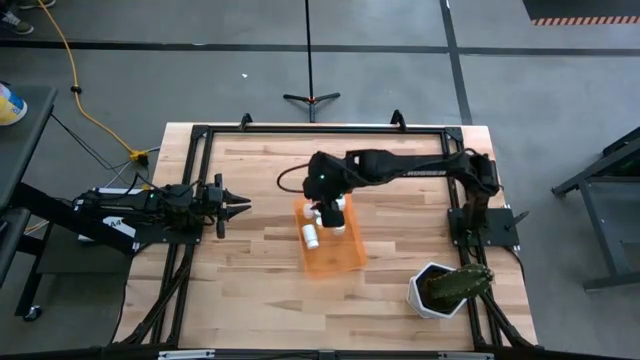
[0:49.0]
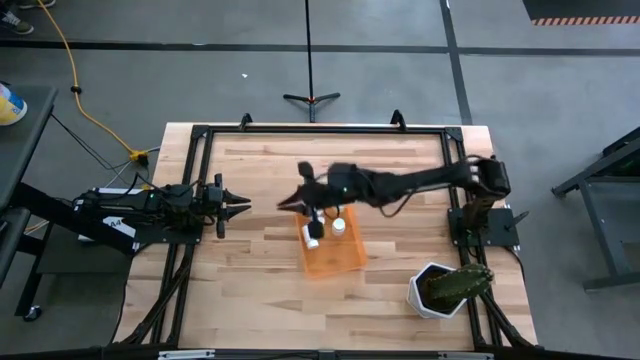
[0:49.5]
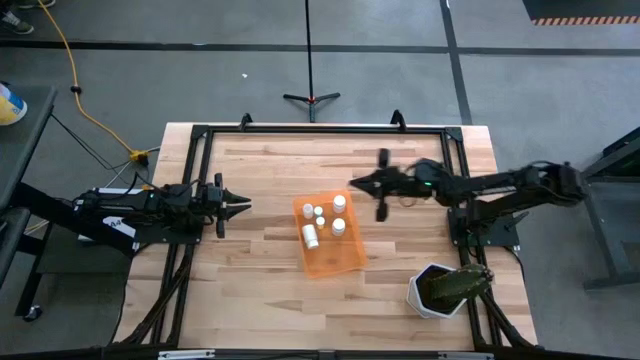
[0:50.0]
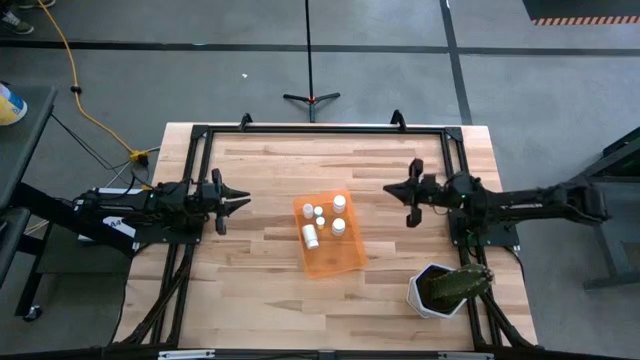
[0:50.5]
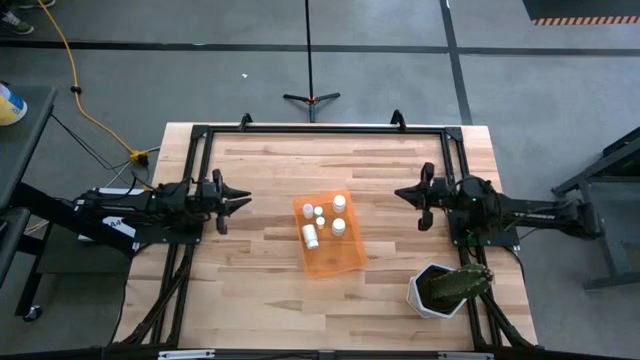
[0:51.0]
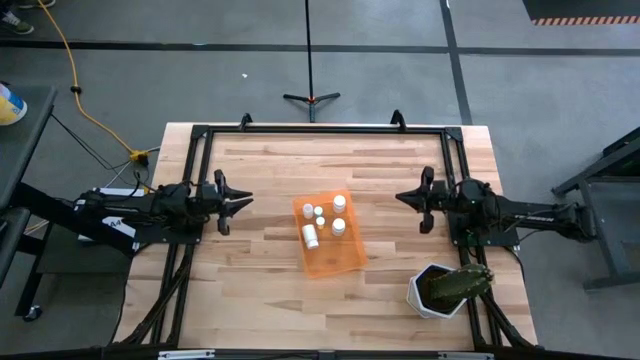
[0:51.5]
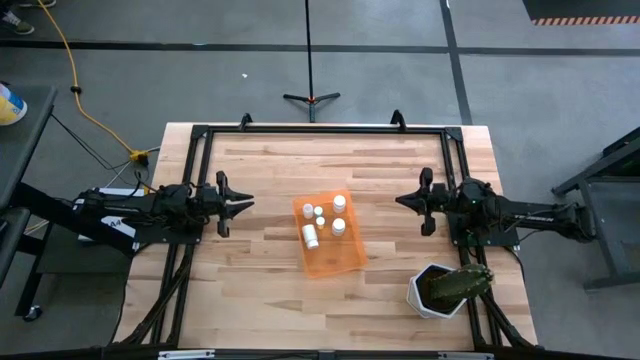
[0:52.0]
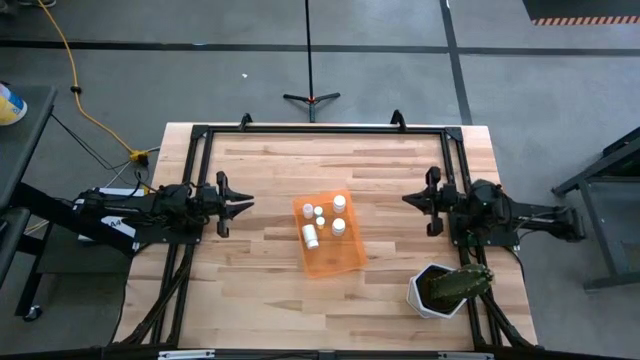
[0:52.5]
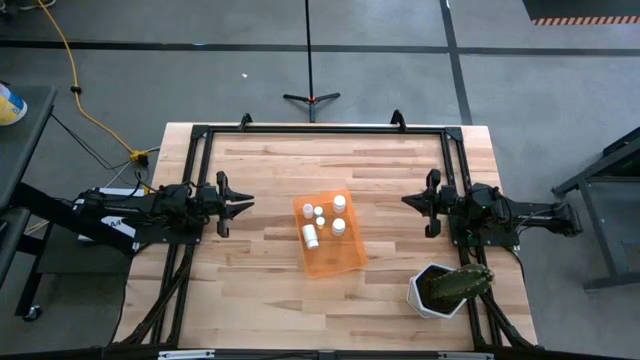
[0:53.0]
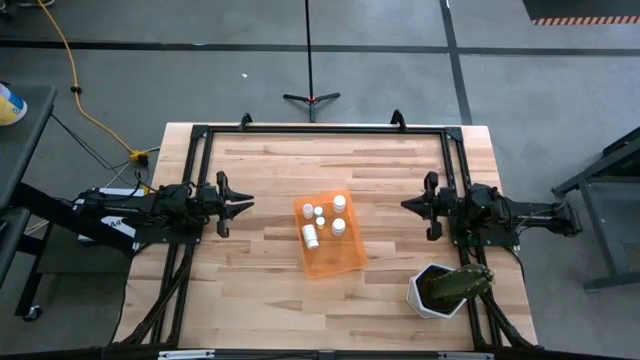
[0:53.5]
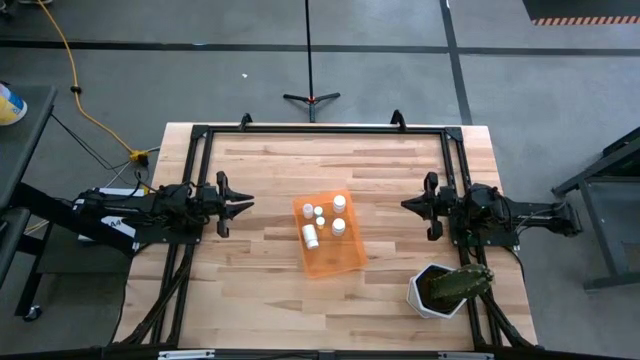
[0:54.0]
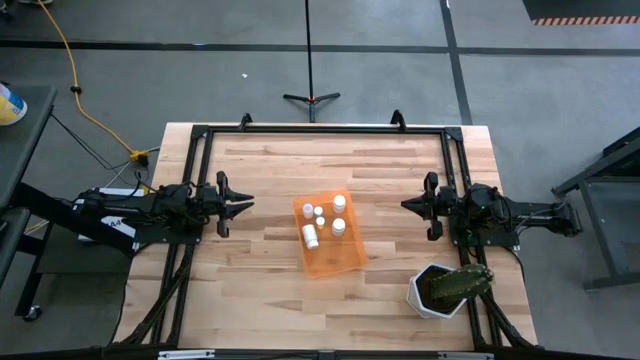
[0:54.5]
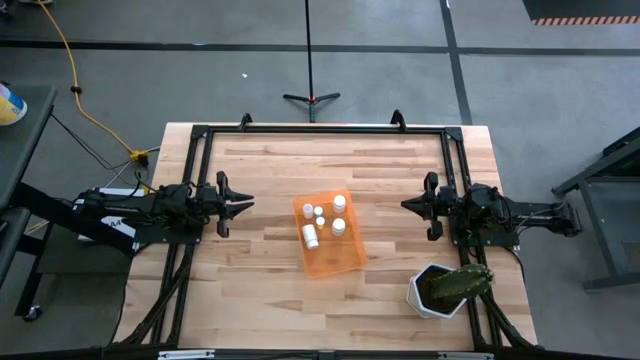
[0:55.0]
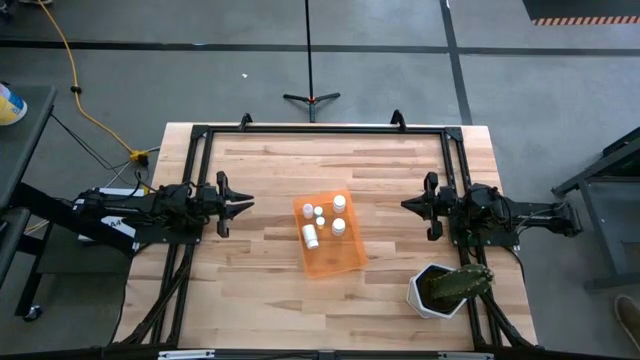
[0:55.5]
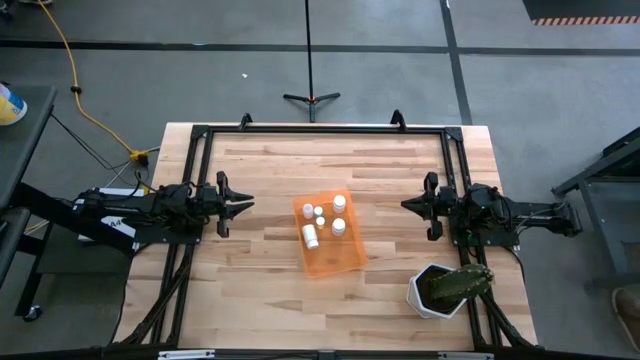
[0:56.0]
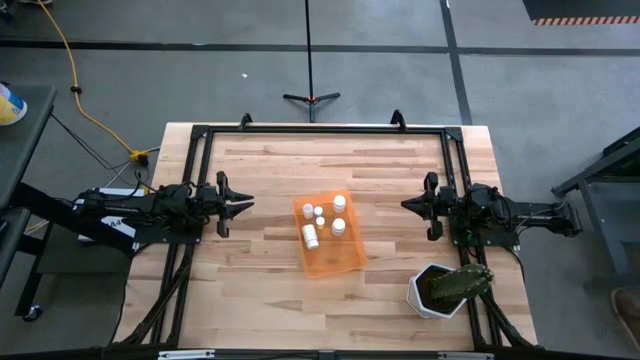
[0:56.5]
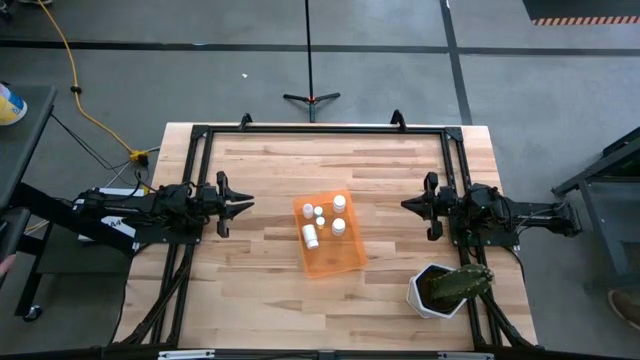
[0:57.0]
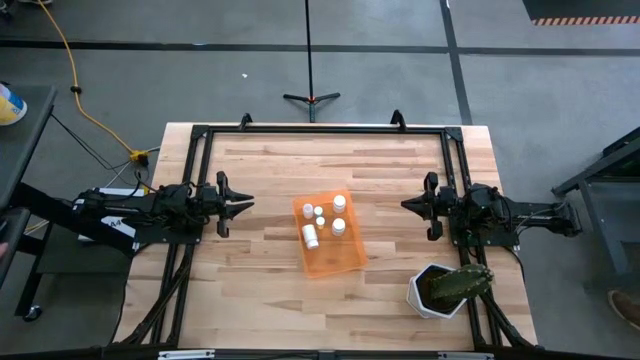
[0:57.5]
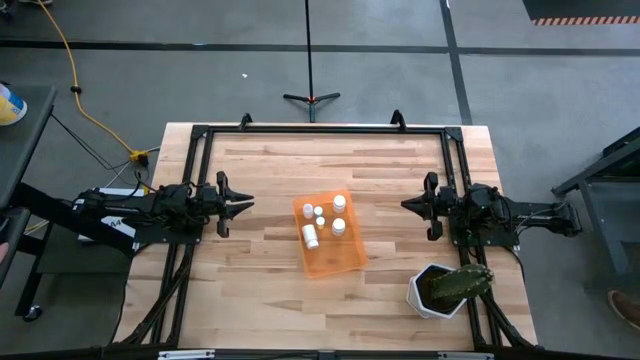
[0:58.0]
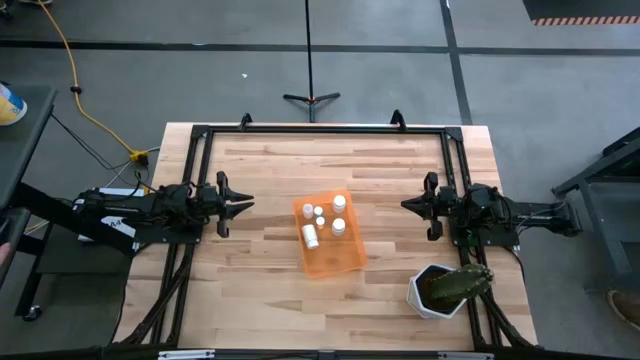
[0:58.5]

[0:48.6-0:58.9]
Task: Pick and place pill bottles into a basket
Return to Home Position

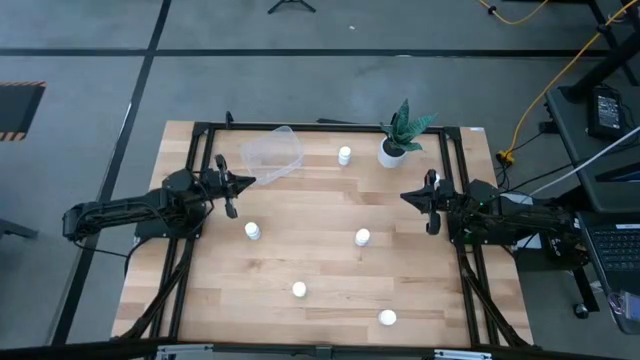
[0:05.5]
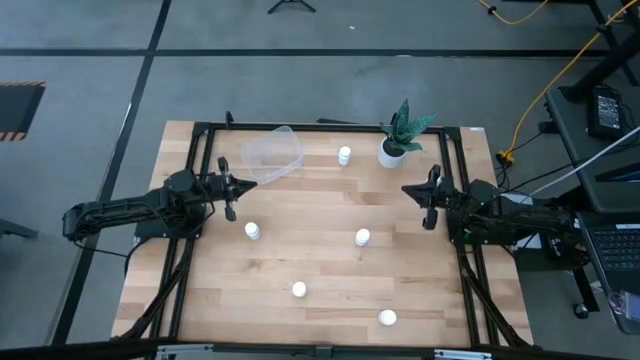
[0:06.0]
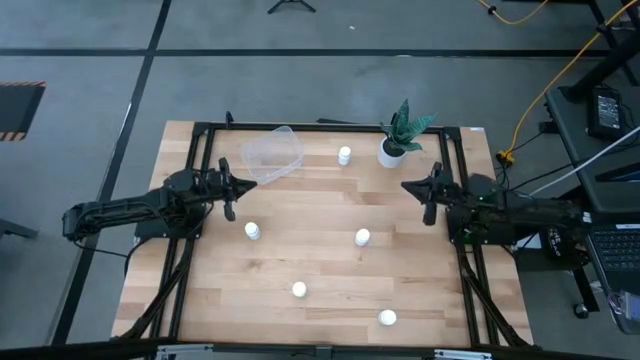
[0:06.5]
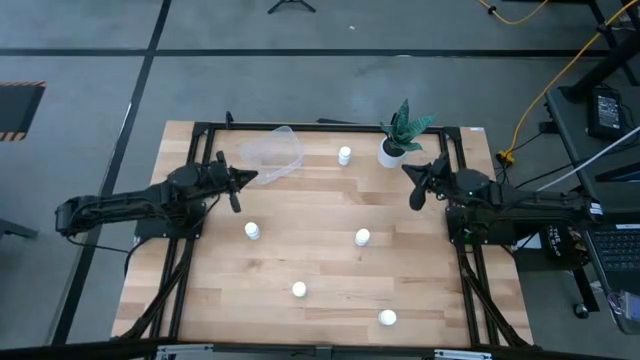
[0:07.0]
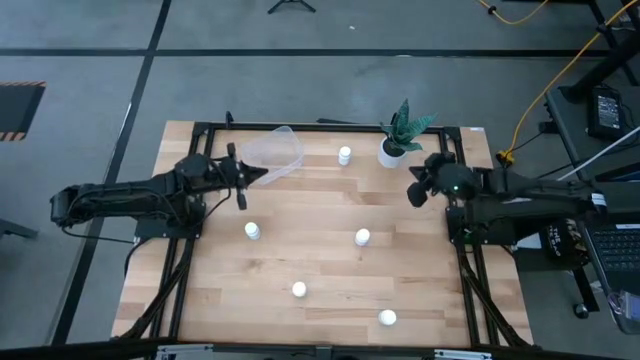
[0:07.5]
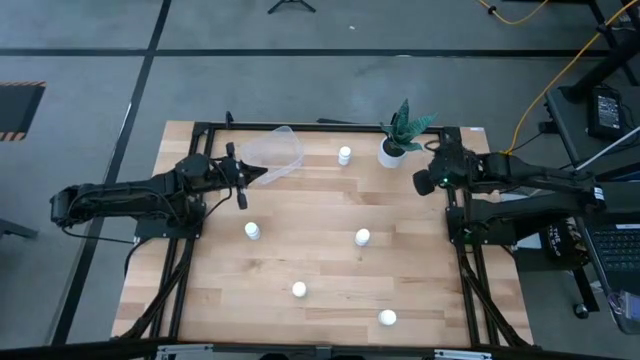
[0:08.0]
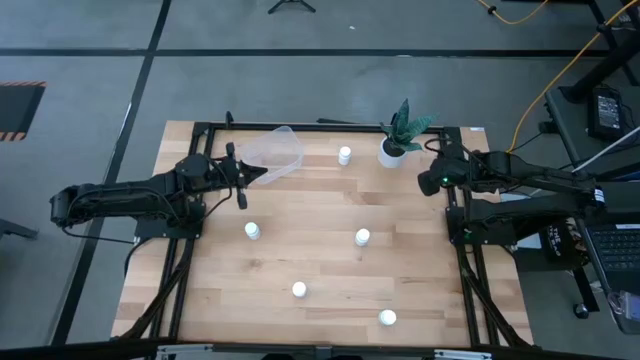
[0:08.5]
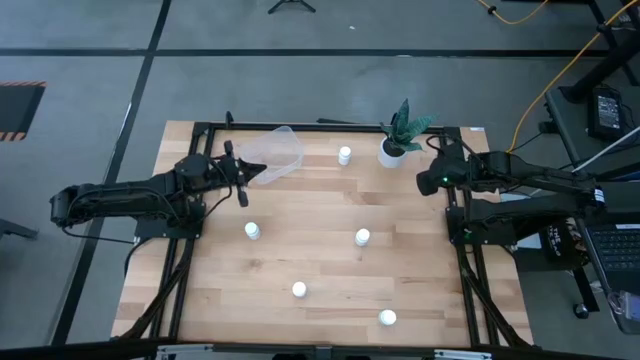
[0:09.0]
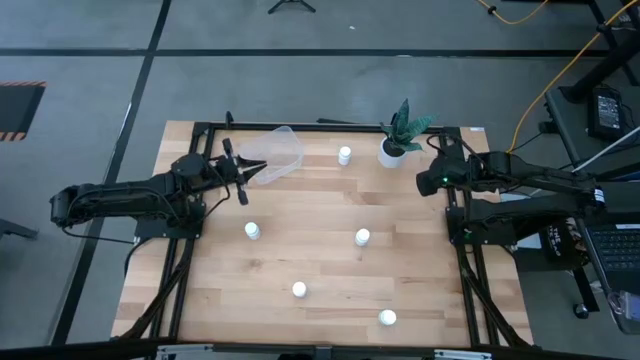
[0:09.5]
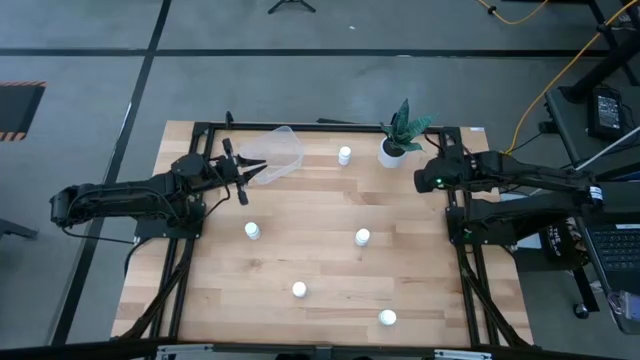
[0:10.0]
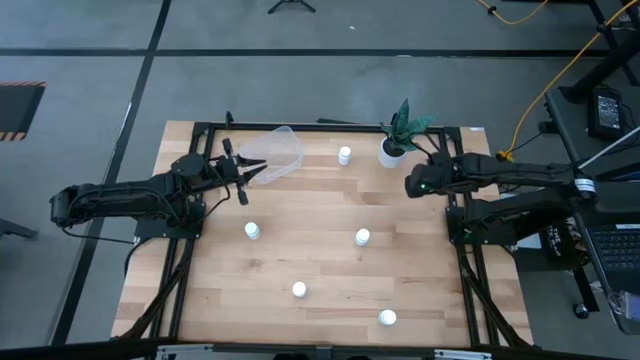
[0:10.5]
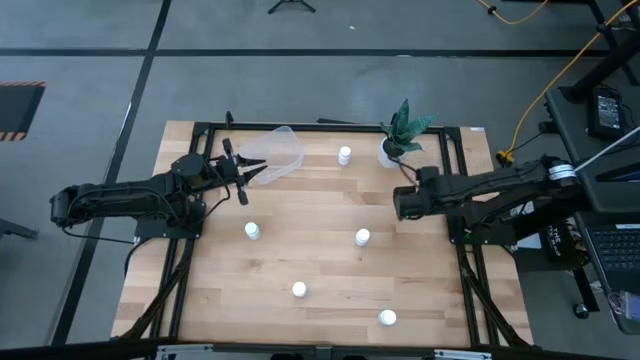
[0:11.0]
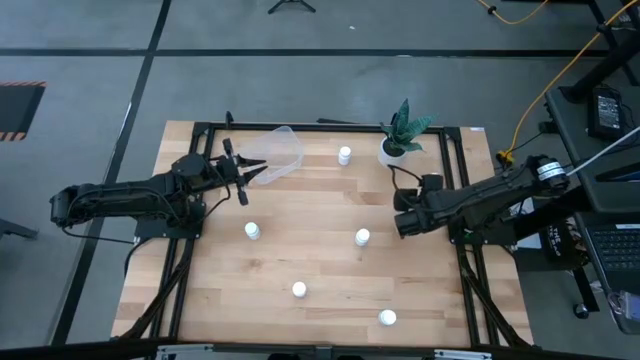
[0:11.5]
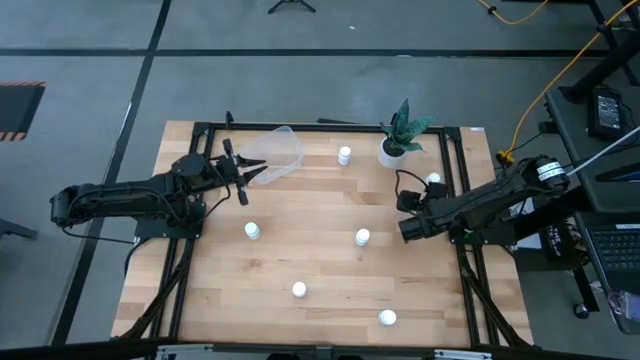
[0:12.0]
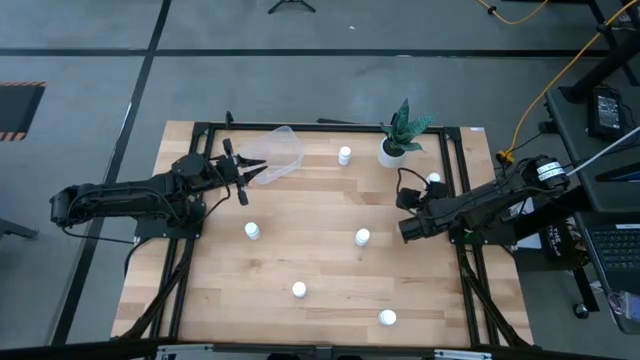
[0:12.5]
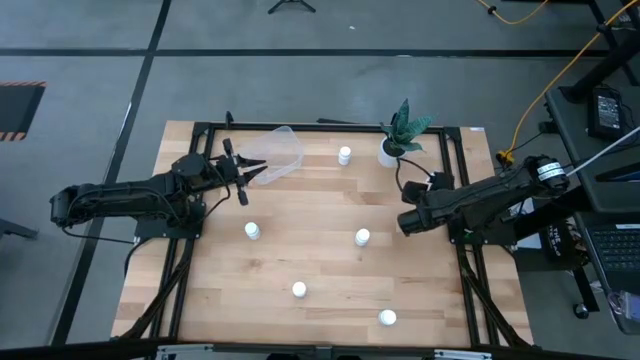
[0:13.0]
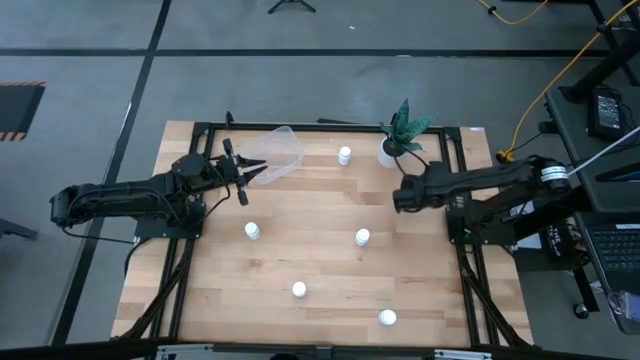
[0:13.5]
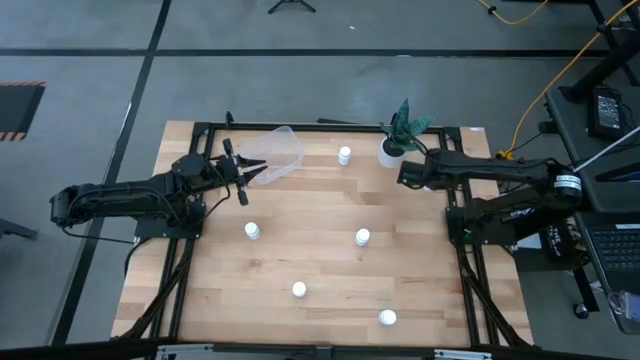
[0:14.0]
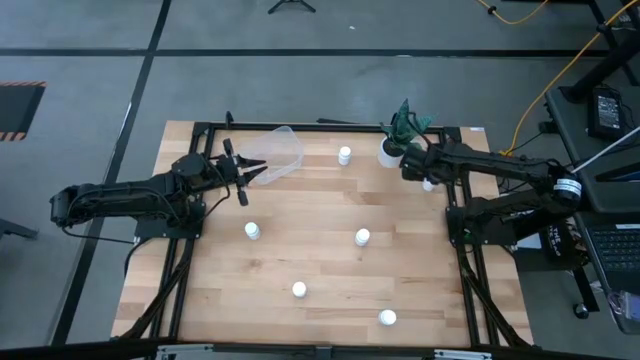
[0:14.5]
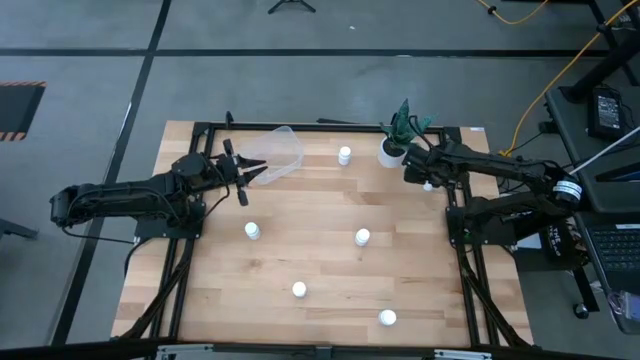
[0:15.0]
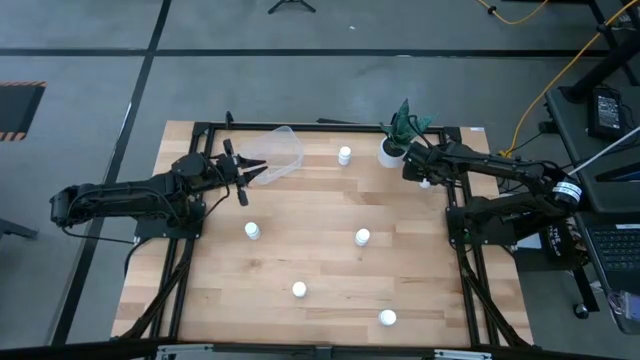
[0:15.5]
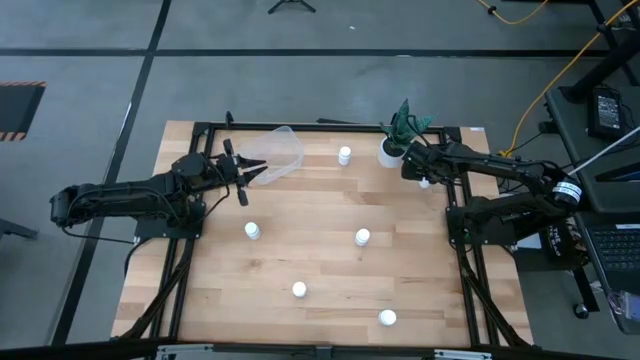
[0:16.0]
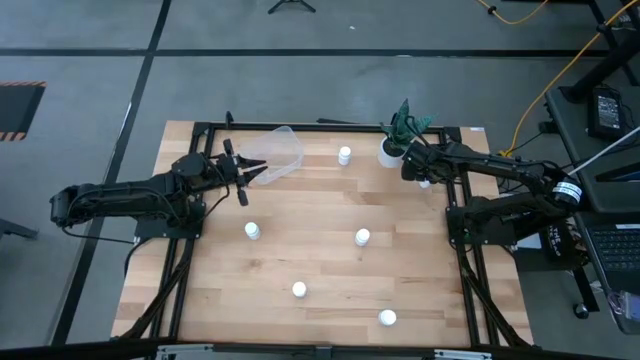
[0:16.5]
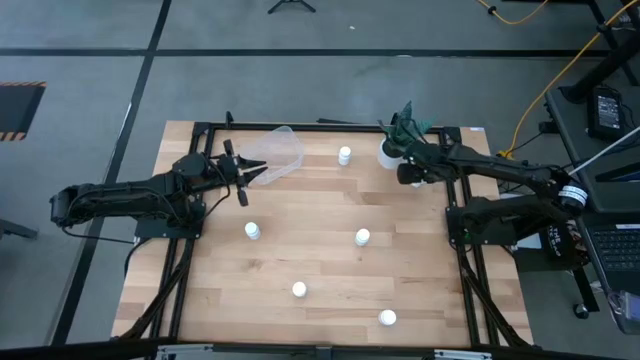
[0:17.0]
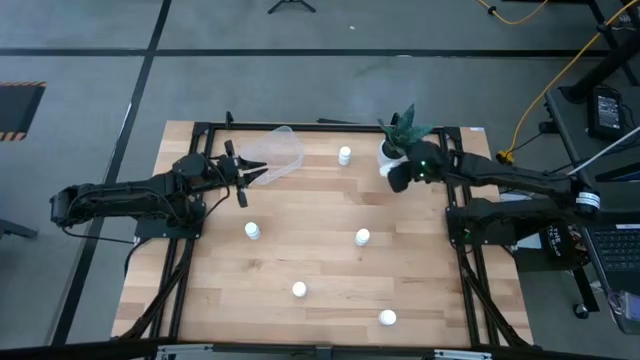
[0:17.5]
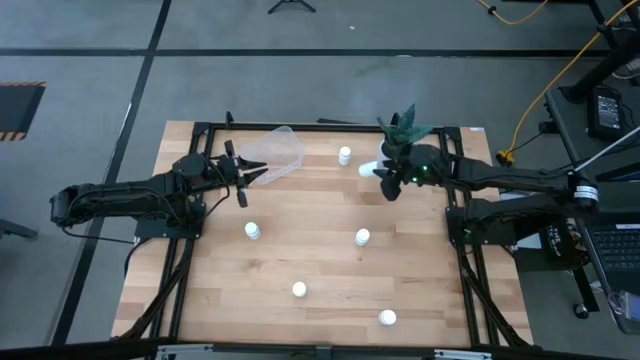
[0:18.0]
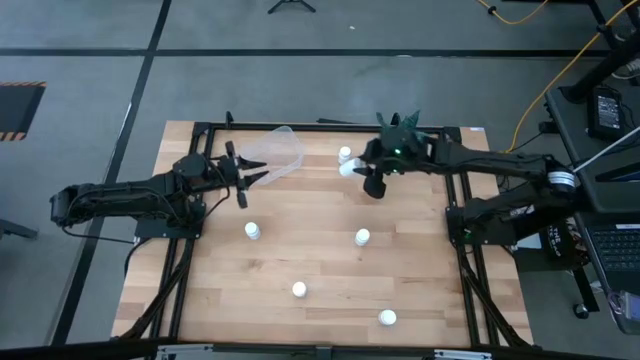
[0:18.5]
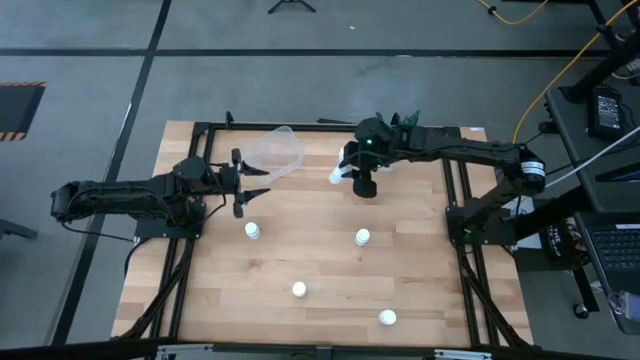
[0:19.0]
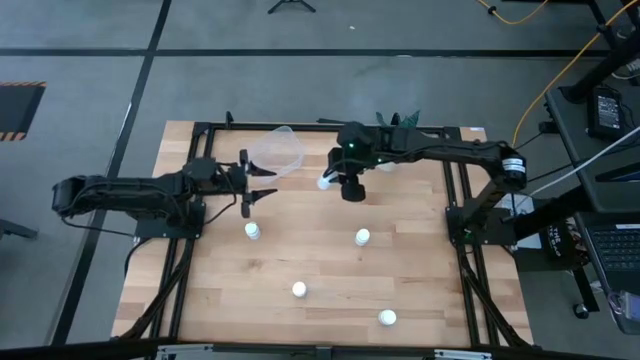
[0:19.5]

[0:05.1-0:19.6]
Task: Pick and place pill bottles into a basket
Put the white pill bottle into the transparent container
